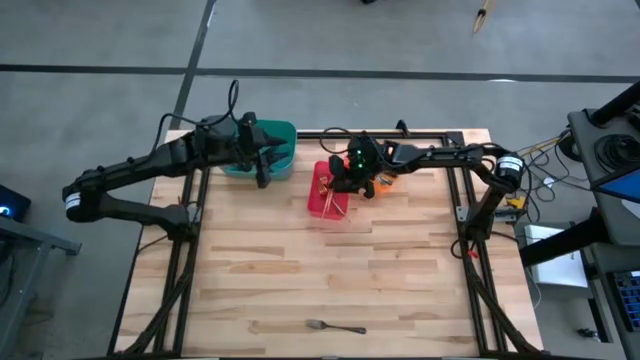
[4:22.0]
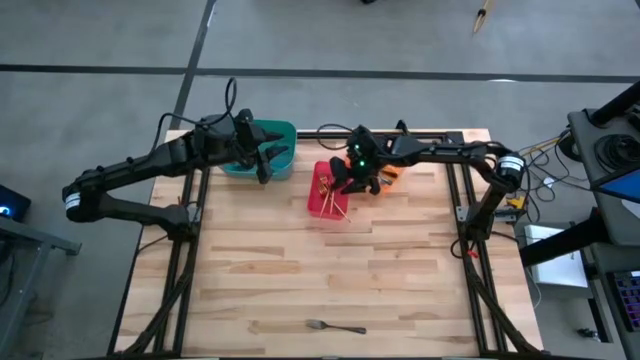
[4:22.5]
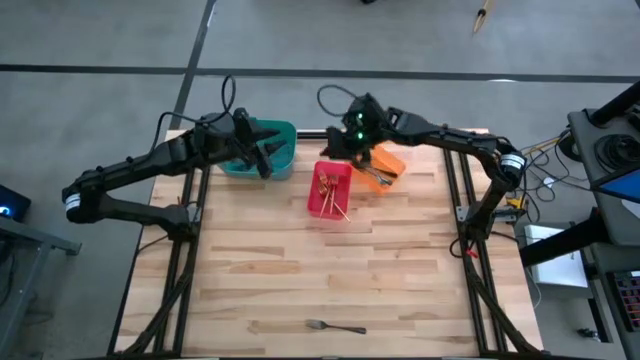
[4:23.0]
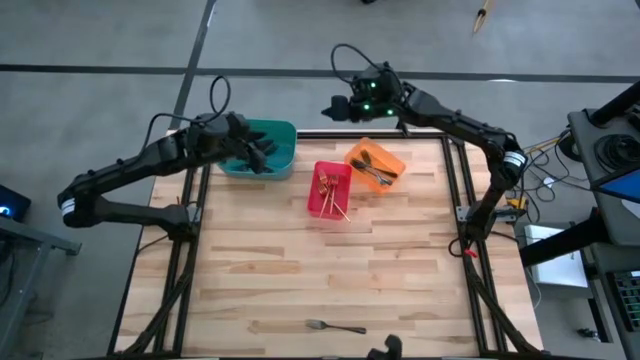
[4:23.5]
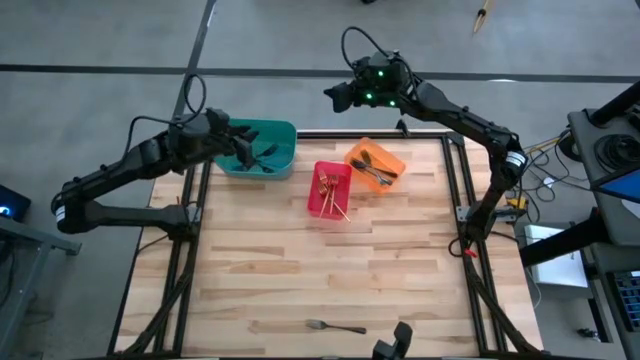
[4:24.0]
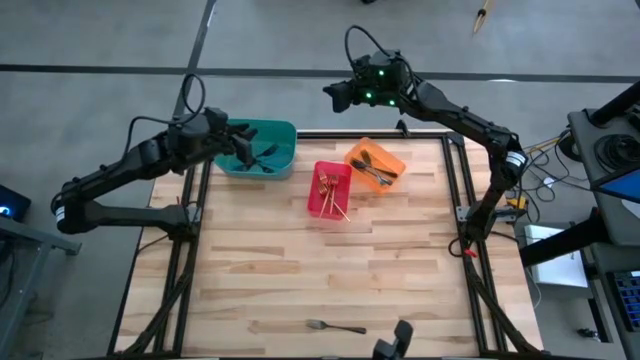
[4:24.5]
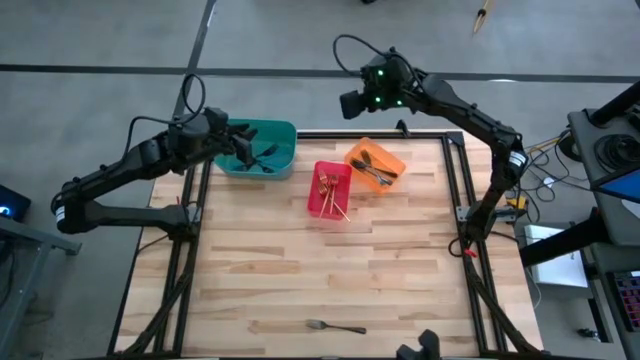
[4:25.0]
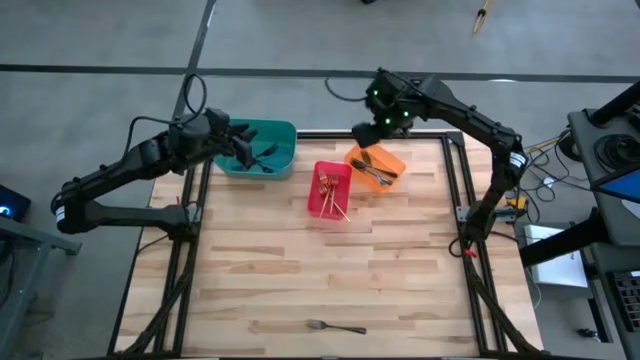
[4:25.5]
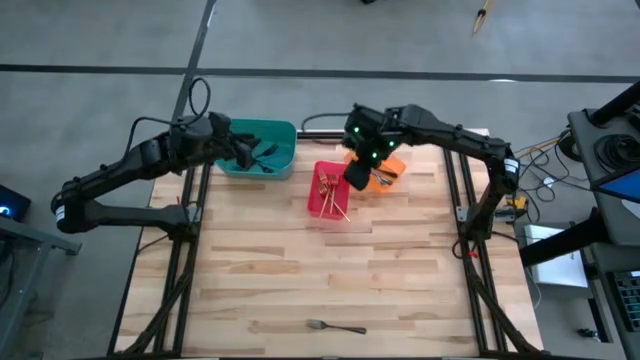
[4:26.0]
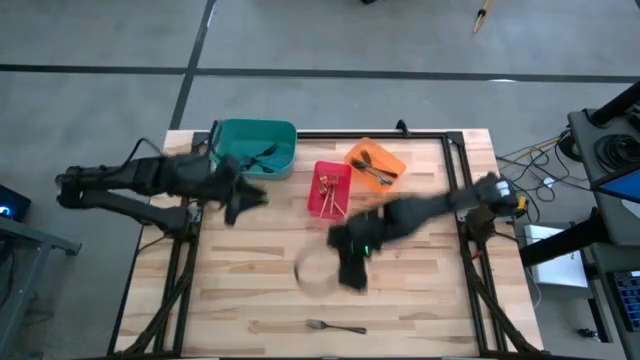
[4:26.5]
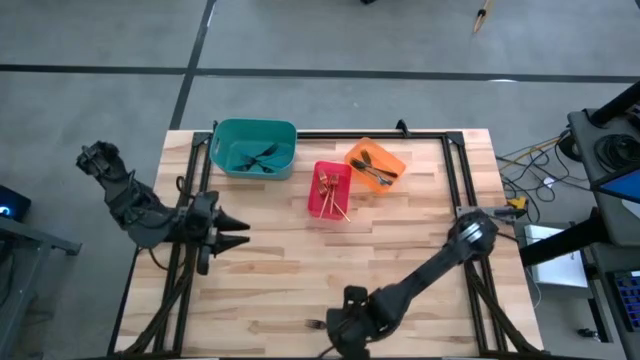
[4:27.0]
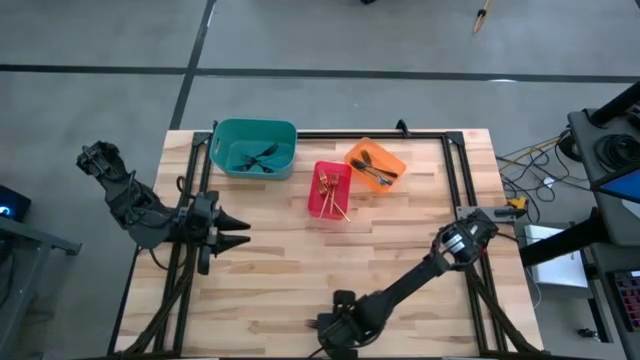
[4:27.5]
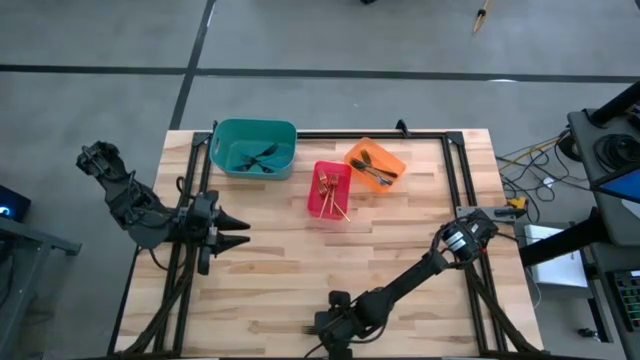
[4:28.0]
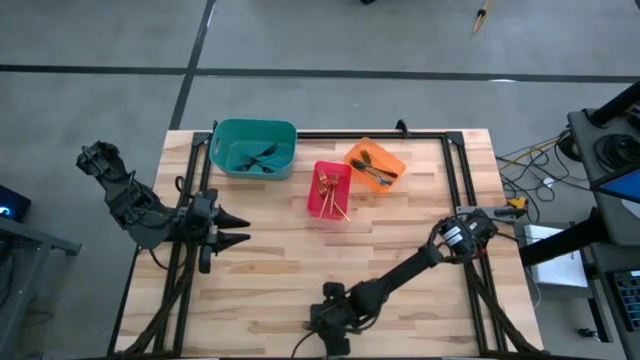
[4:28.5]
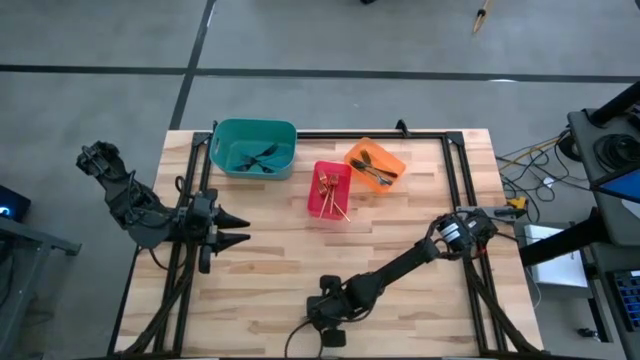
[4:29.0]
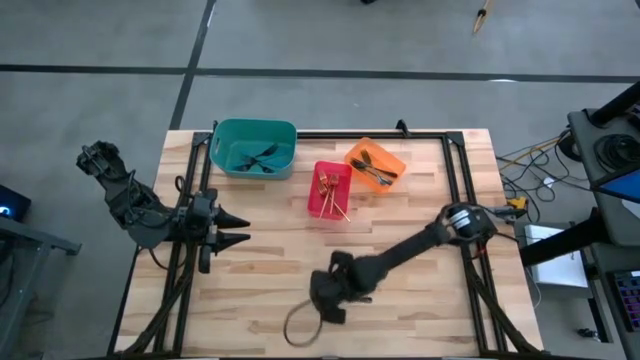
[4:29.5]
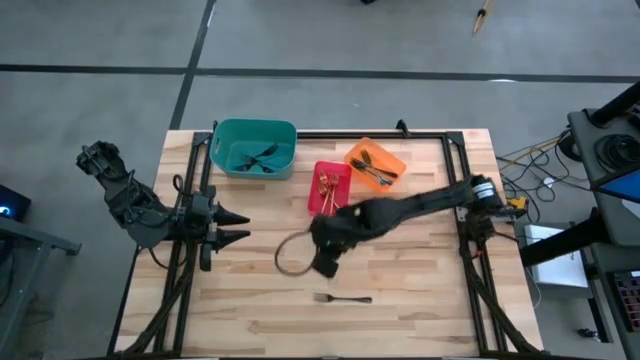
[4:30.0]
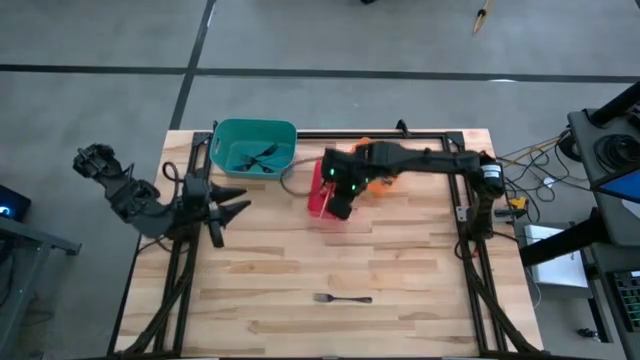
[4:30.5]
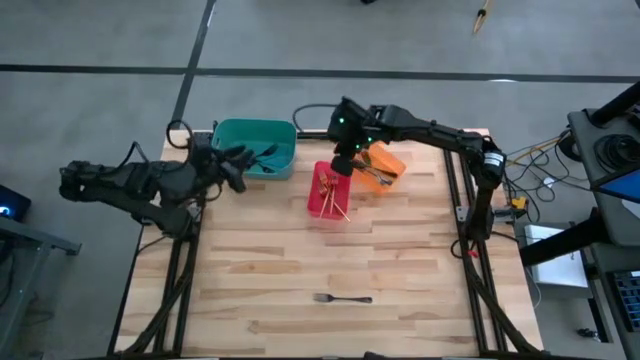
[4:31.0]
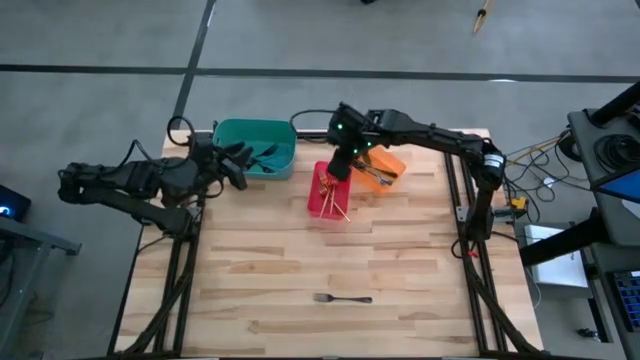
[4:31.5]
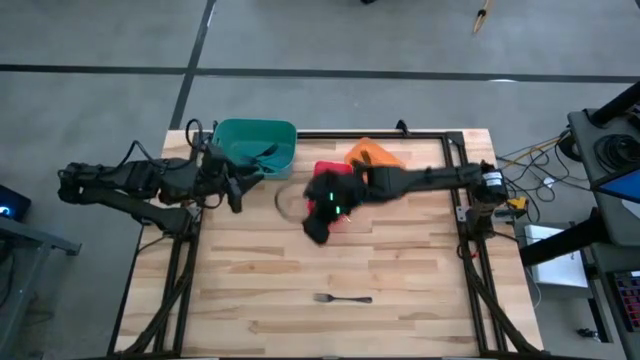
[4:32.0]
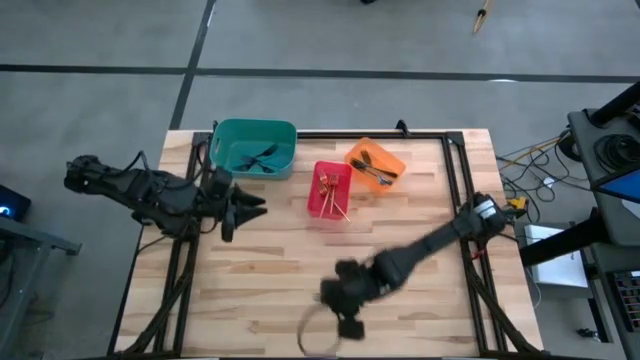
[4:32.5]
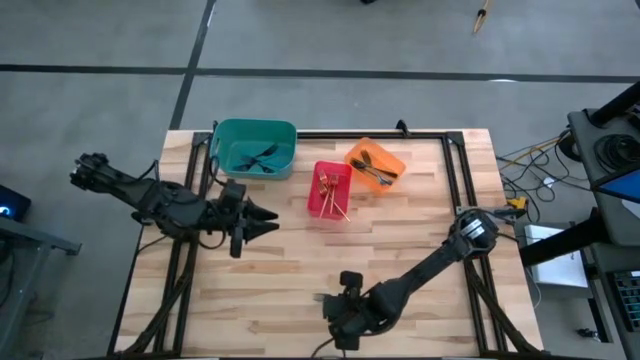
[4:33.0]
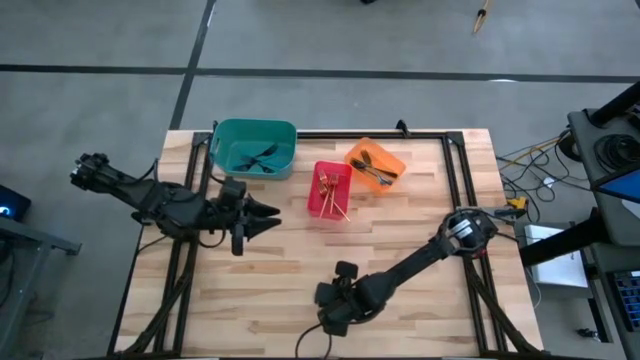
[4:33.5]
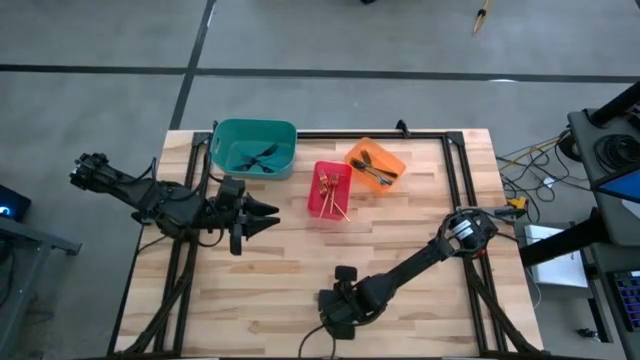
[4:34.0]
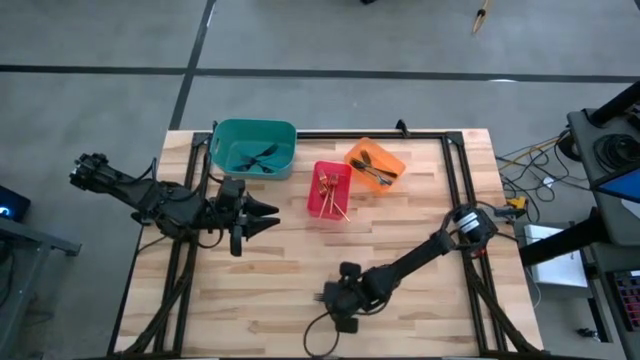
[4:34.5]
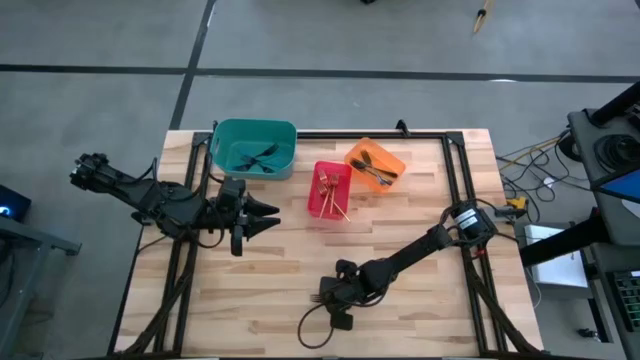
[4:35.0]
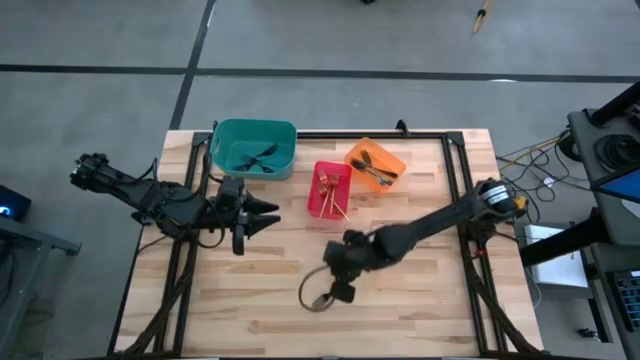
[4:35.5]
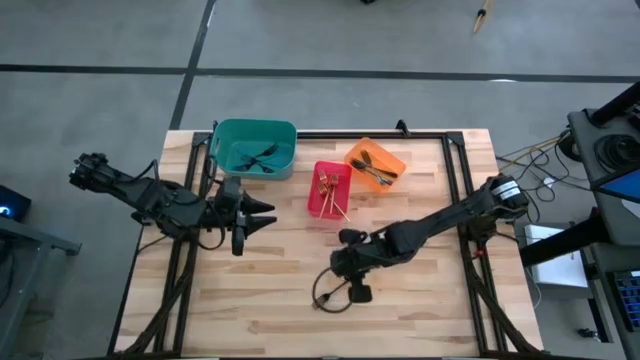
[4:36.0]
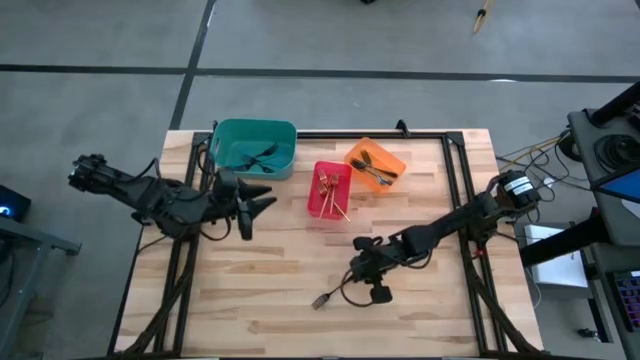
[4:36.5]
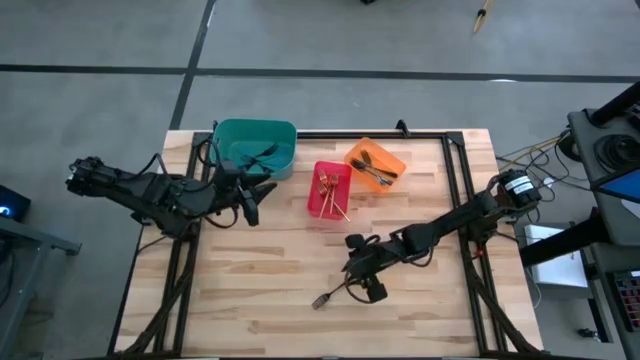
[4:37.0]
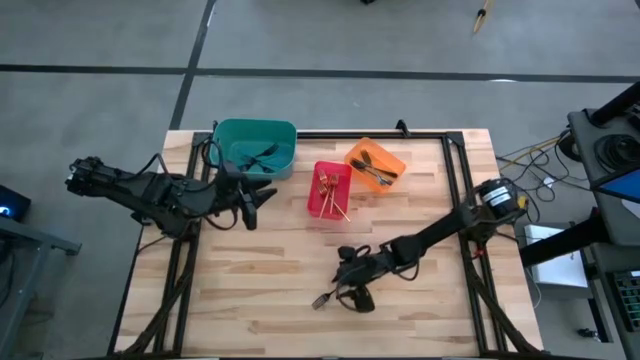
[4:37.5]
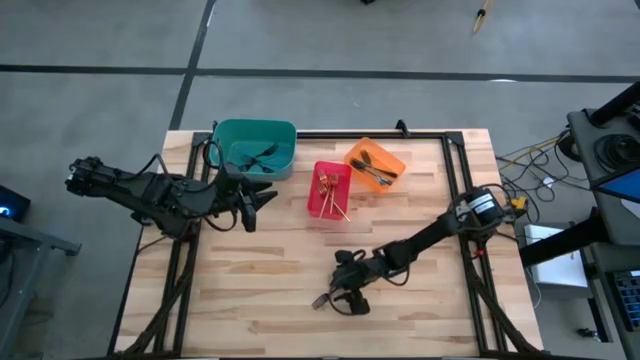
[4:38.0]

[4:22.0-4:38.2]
Task: Sort silverware by color (type)
Put the black fork into the orange bin

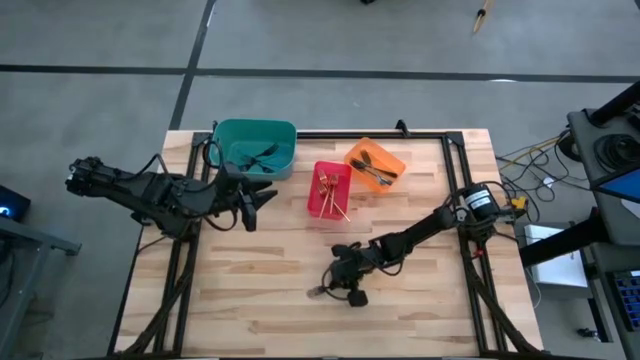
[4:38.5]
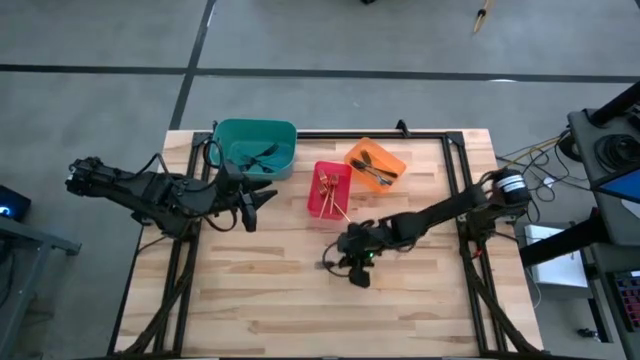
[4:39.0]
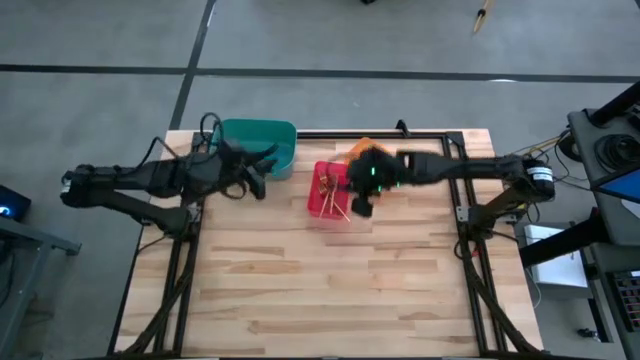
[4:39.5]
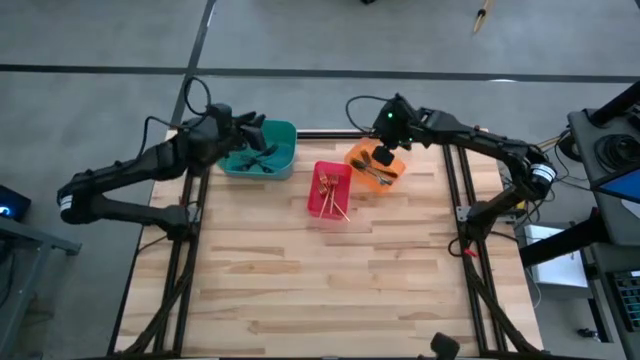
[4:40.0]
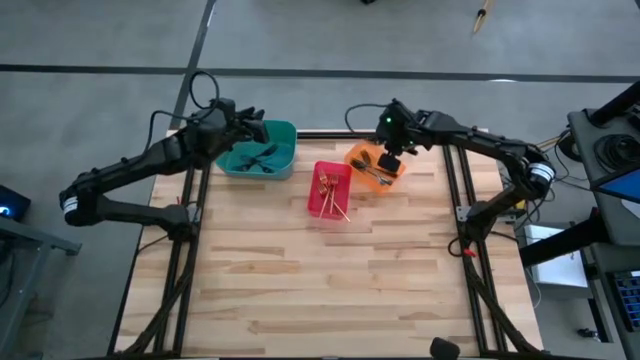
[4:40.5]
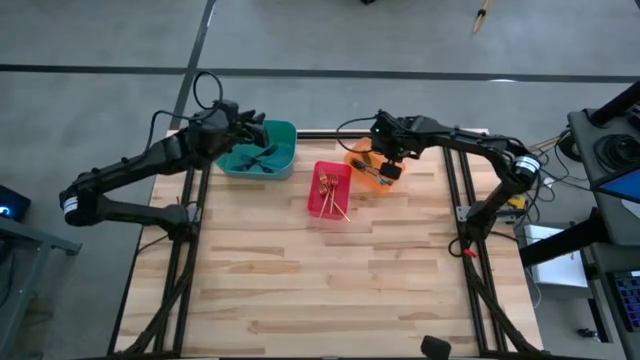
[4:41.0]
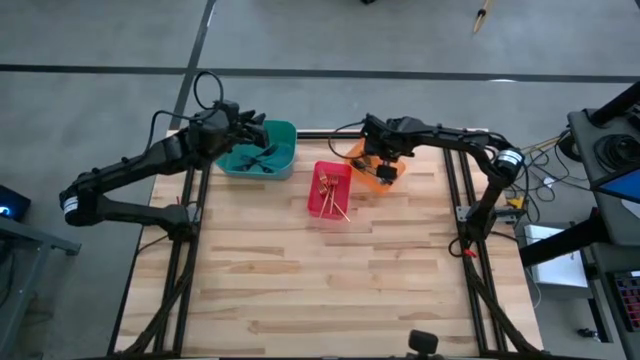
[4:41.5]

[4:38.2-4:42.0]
Put the black fork into the orange bin

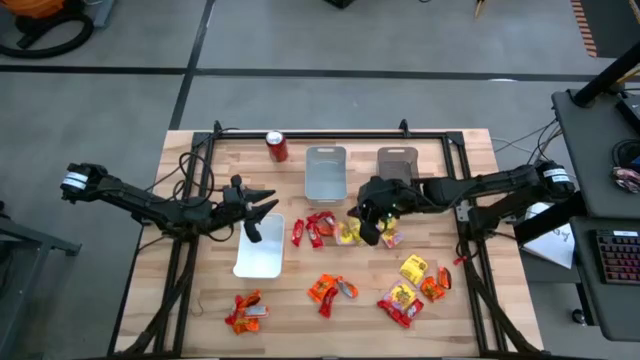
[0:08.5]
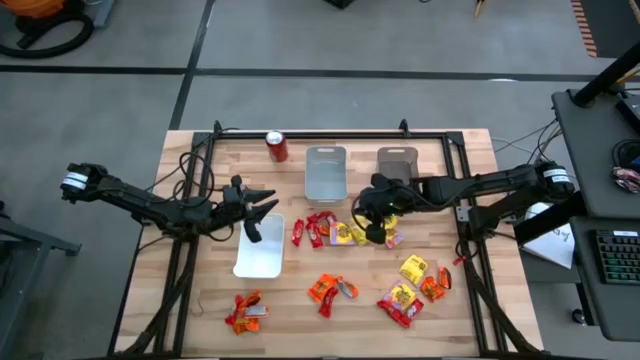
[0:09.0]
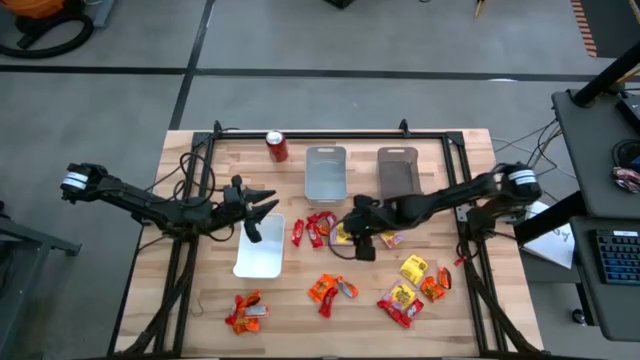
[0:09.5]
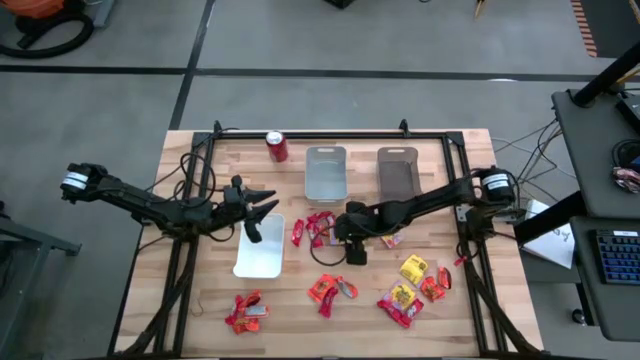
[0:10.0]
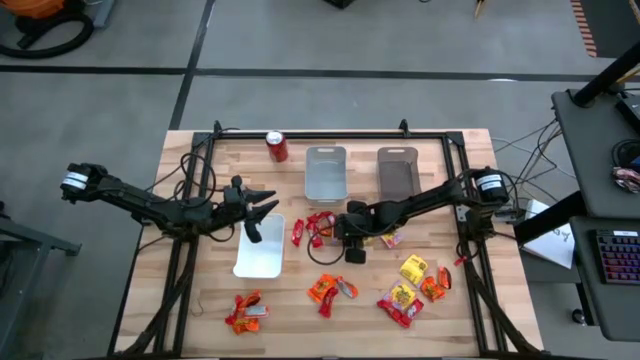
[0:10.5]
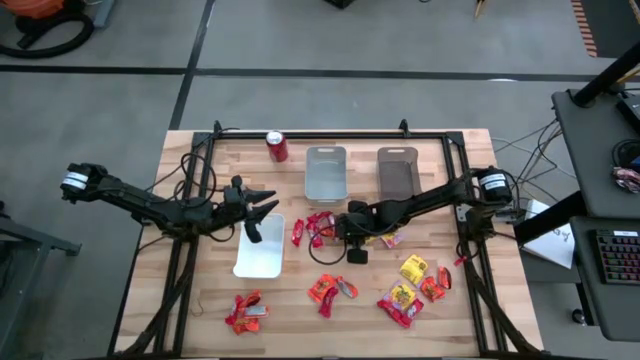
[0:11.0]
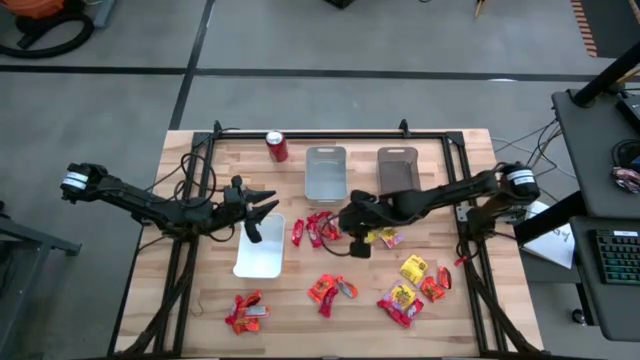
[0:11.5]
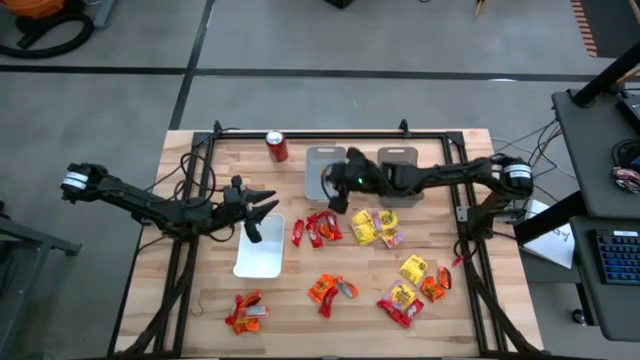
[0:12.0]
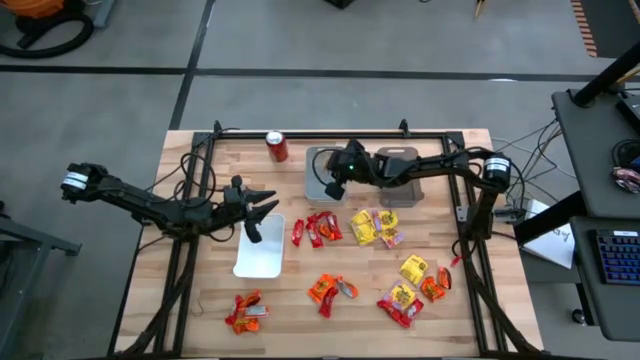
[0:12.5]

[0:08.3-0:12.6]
Task: Sort candy
Put the yellow candy into the gray bin
